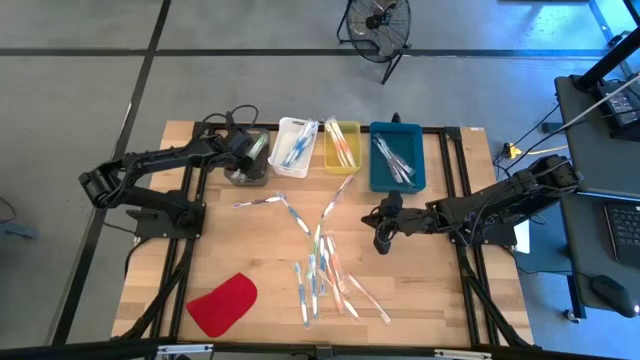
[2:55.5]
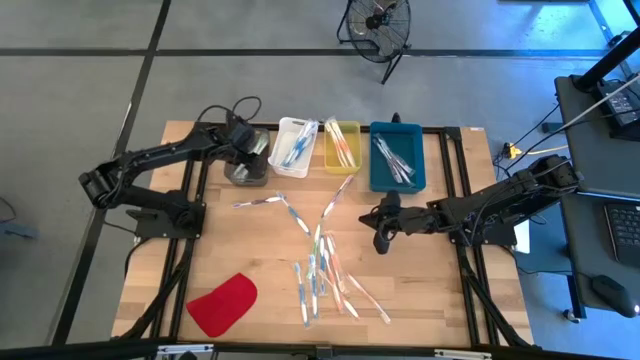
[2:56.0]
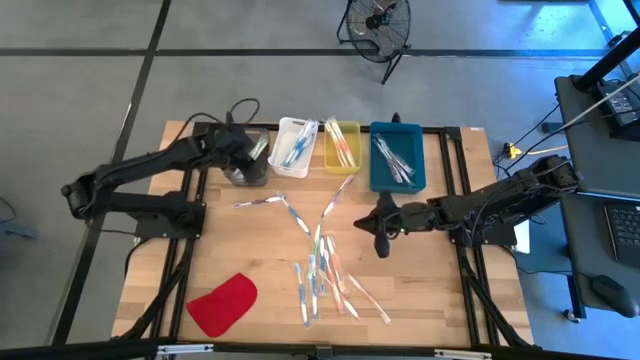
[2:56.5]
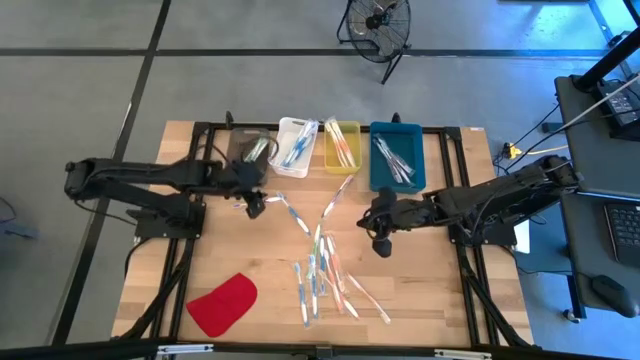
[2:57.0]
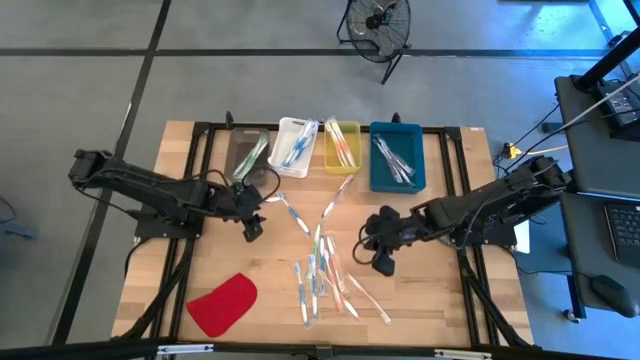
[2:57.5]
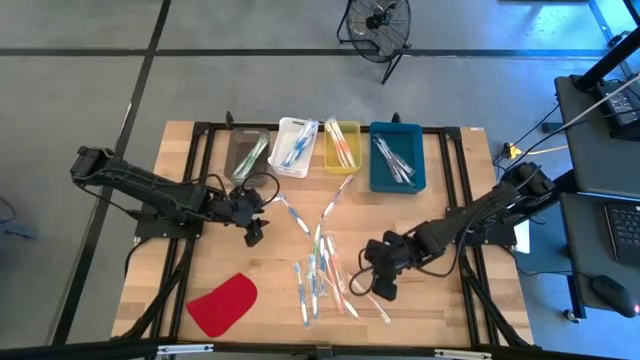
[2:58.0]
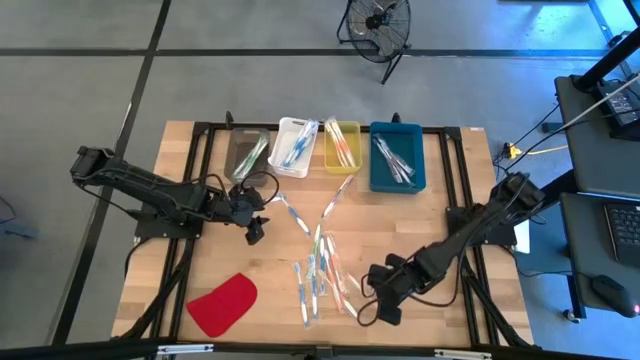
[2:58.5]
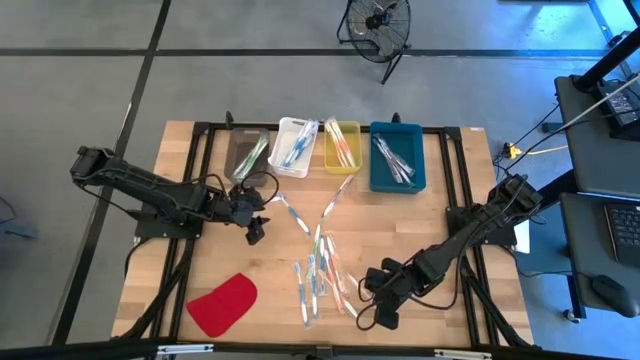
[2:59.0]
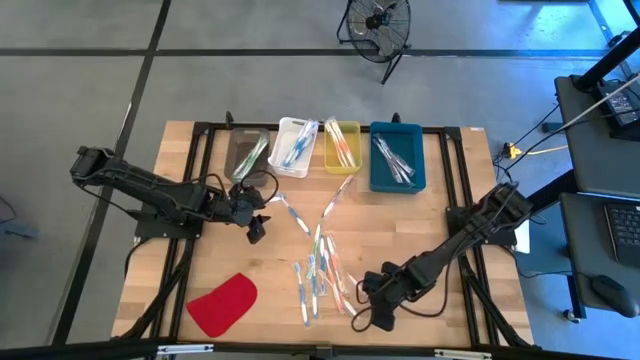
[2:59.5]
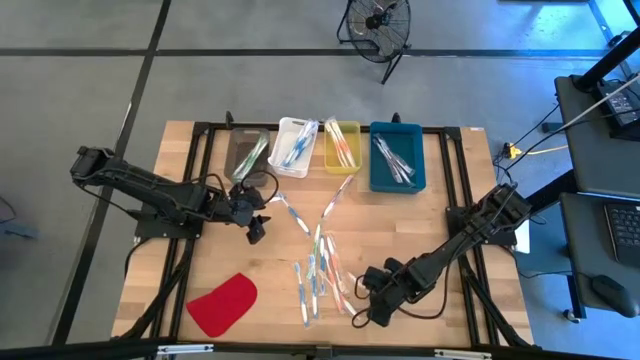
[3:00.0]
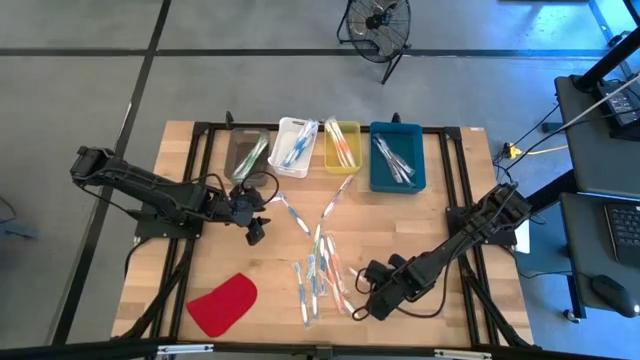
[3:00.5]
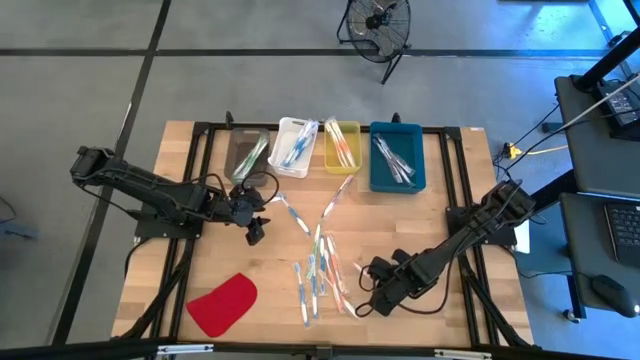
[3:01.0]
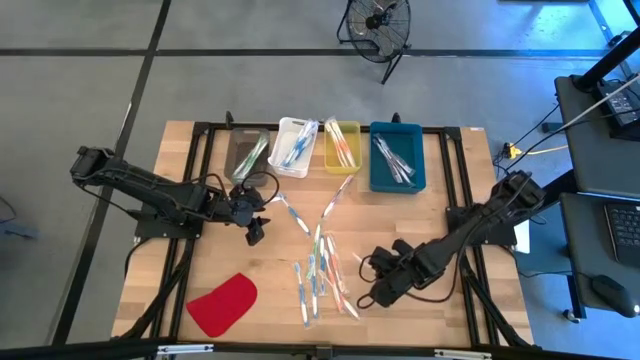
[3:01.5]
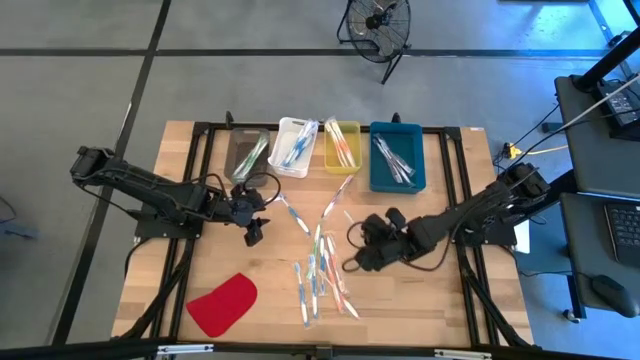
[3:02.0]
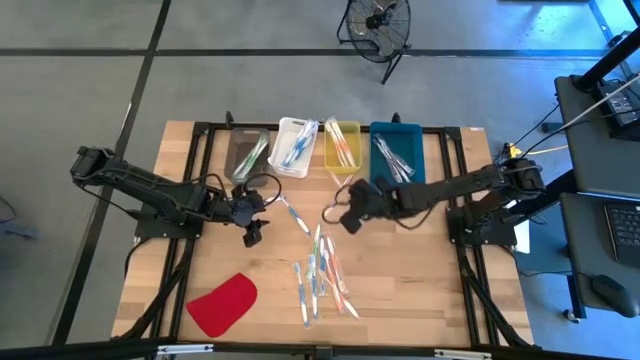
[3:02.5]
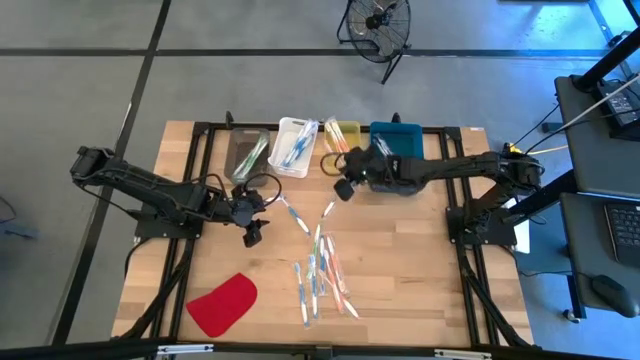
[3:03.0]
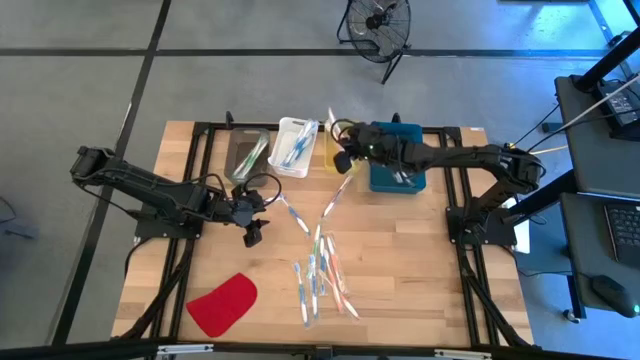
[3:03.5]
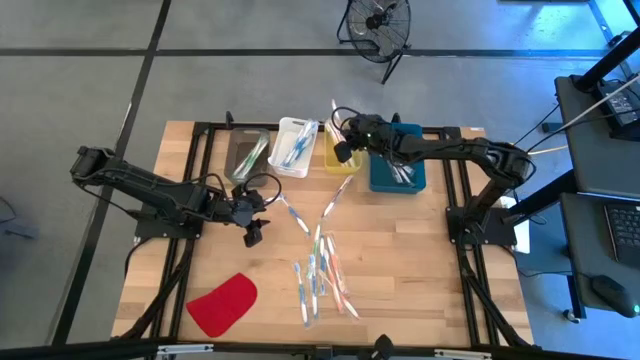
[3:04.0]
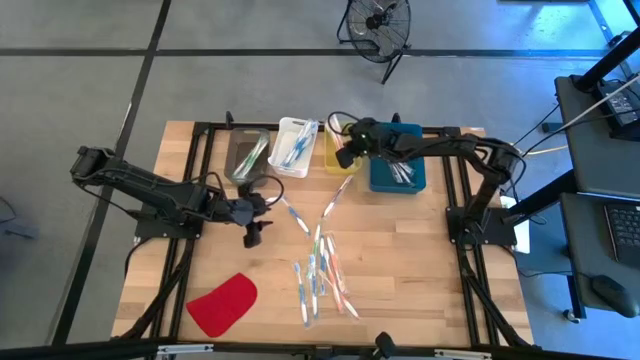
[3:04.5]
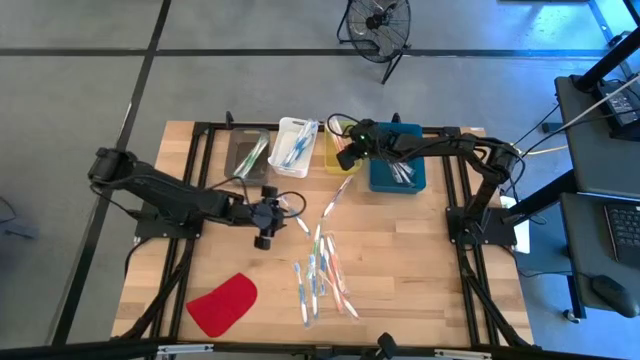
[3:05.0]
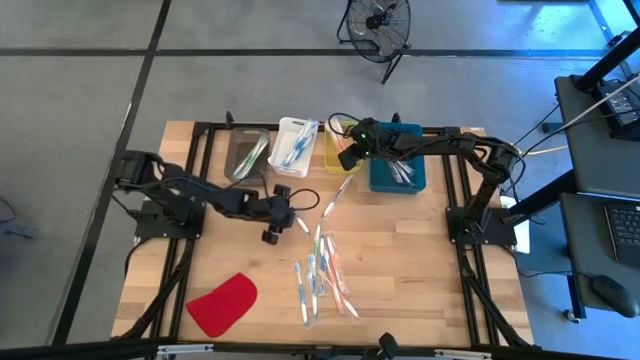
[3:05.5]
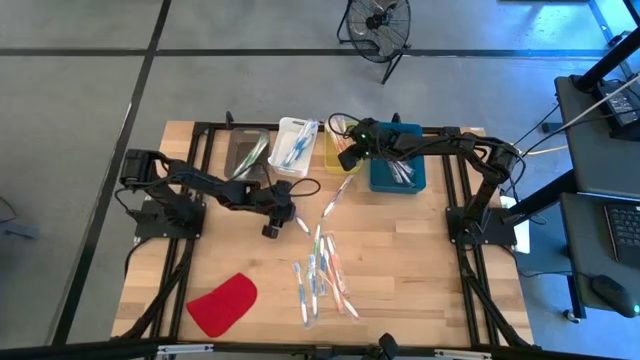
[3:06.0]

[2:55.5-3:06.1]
Task: Pick & Place Toothbrushes
Put the orange toothbrush into the yellow bin

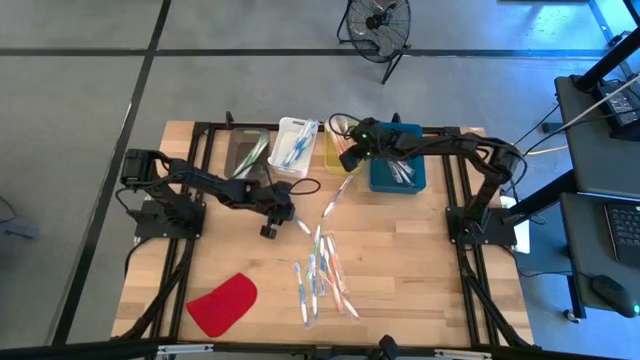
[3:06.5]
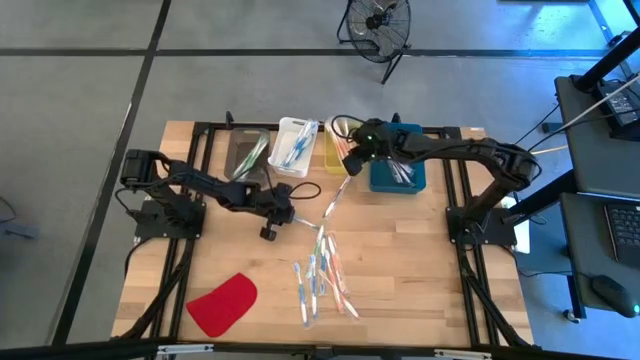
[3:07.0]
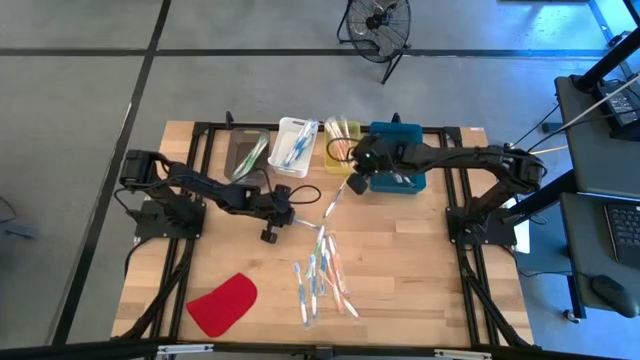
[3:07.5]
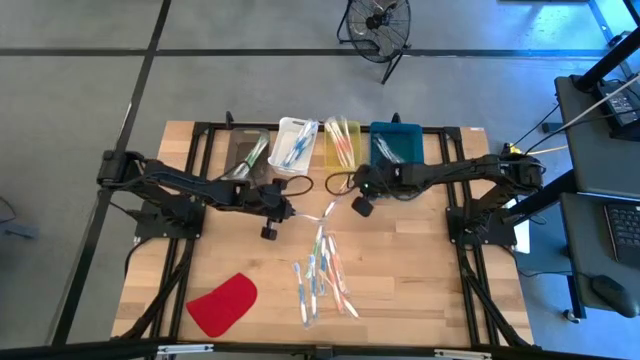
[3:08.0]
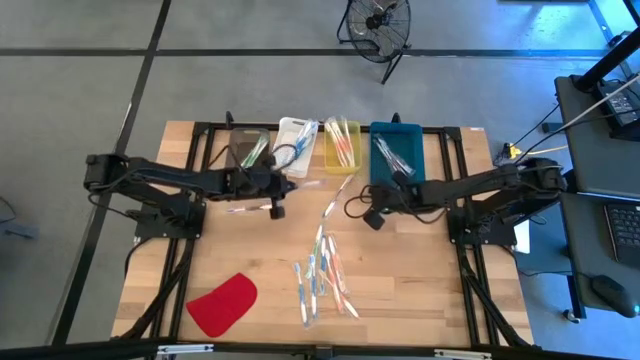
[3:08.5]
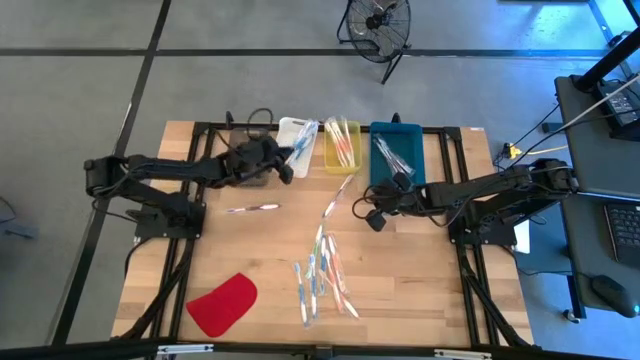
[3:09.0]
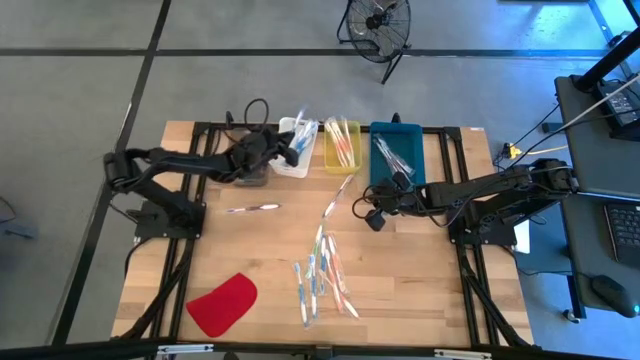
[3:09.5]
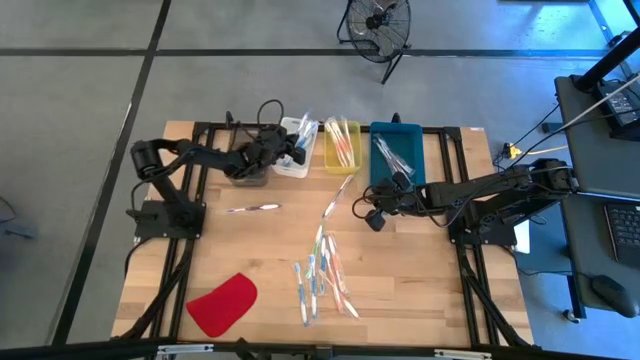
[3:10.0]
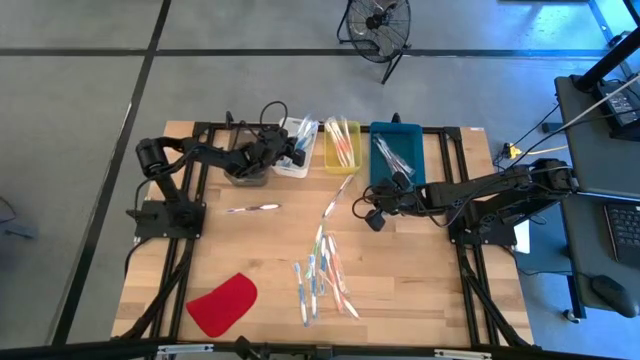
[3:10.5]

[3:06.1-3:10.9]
Put the blue toothbrush into the white bin

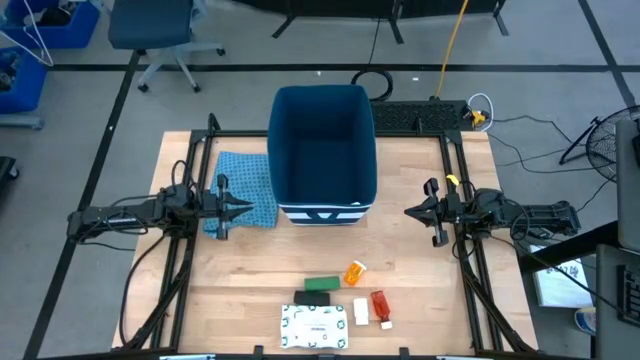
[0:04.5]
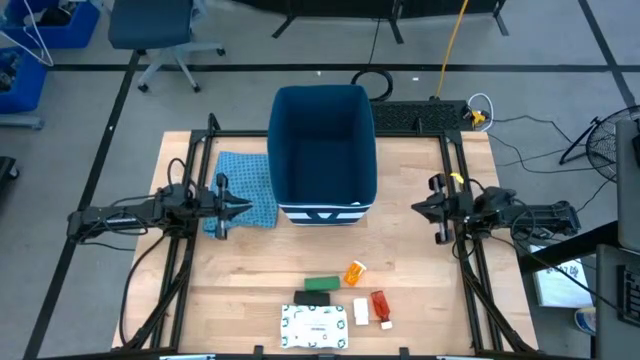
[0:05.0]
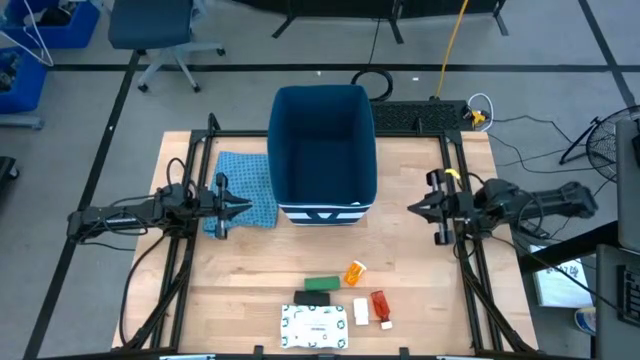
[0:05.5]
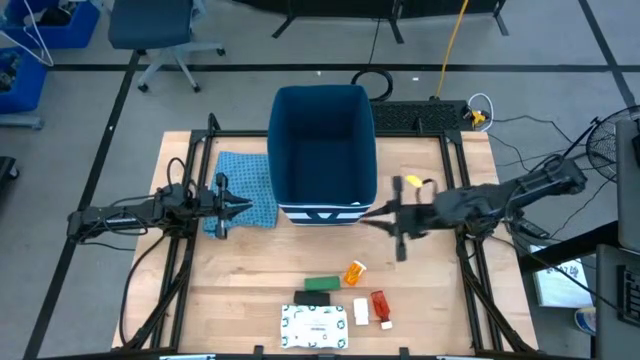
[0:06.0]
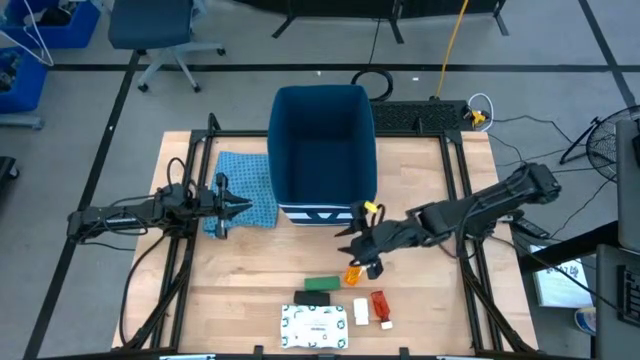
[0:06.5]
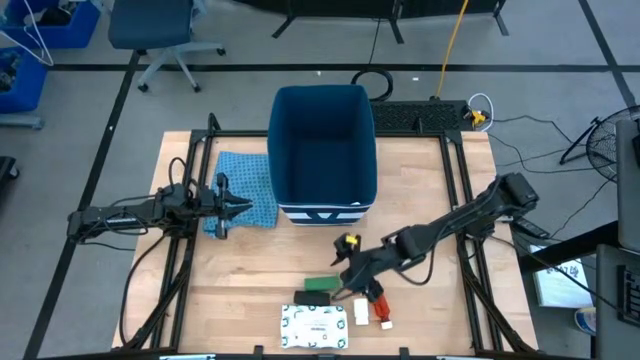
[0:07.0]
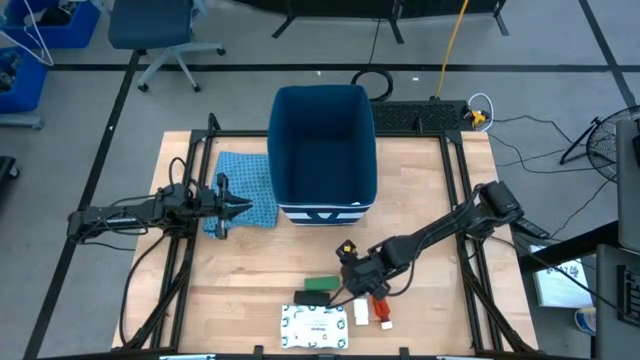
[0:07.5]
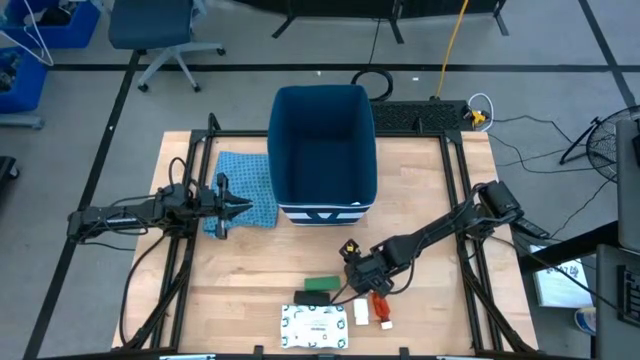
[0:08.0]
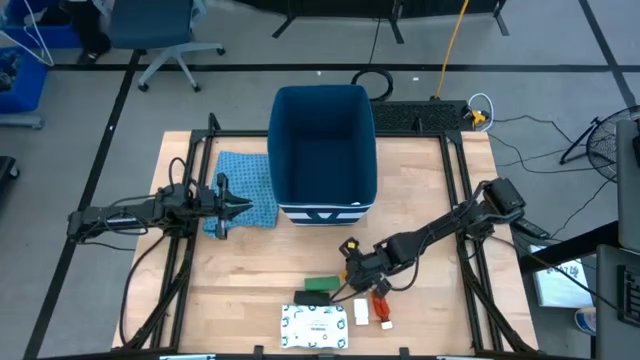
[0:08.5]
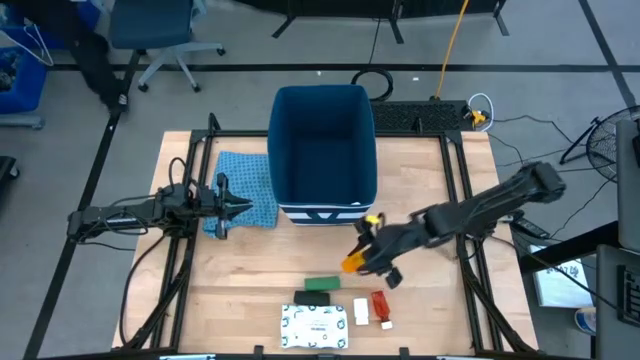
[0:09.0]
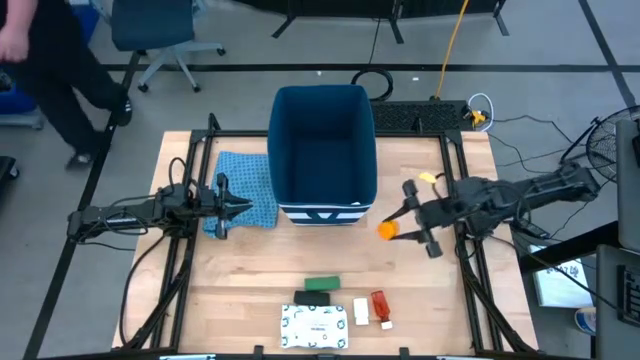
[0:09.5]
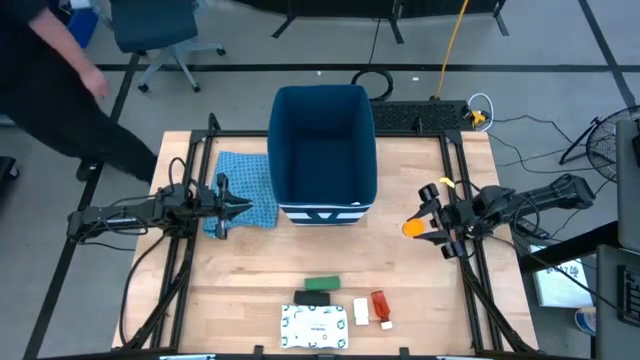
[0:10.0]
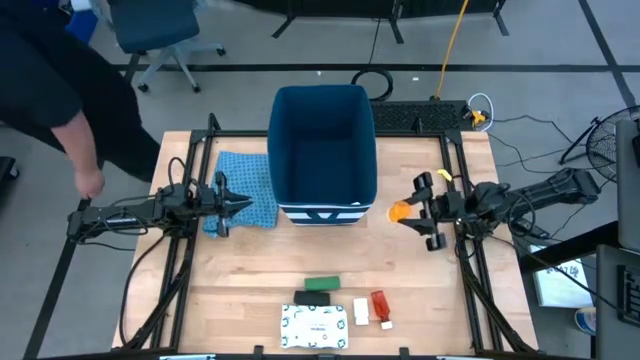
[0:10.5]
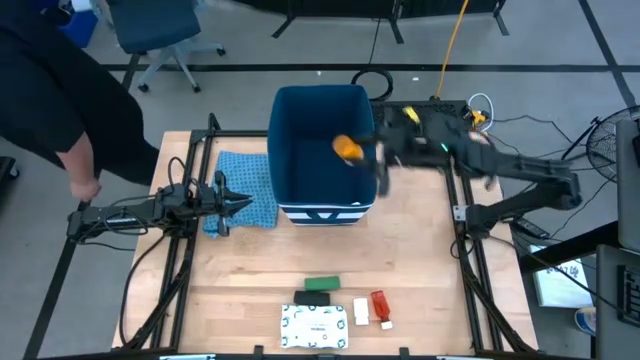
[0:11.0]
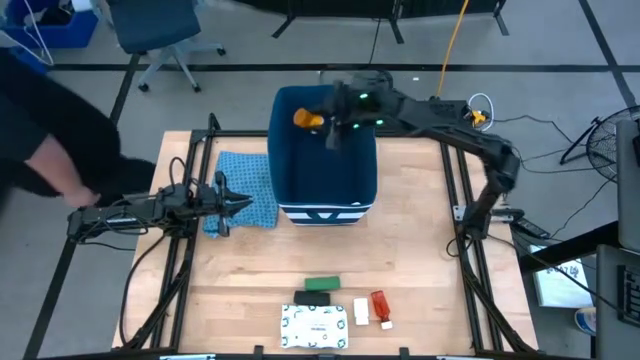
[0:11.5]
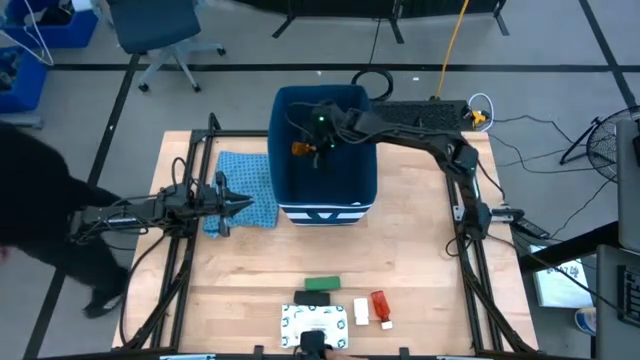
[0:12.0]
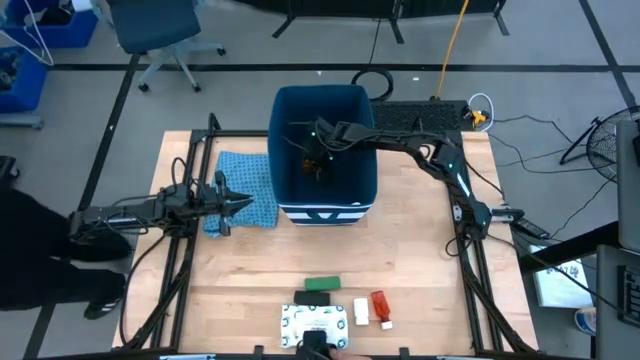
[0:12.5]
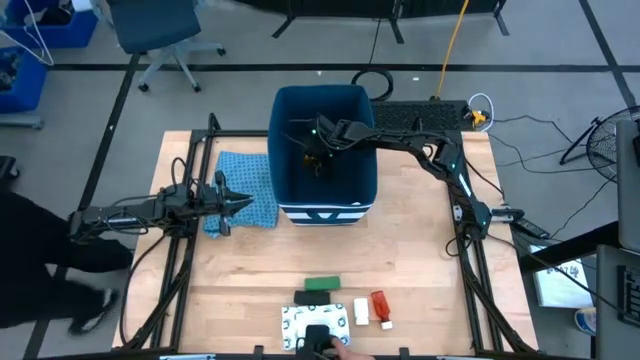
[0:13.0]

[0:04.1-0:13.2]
Task: Pick & place medical supplies in basket/bin
Put the orange pill bottle into the blue bin
